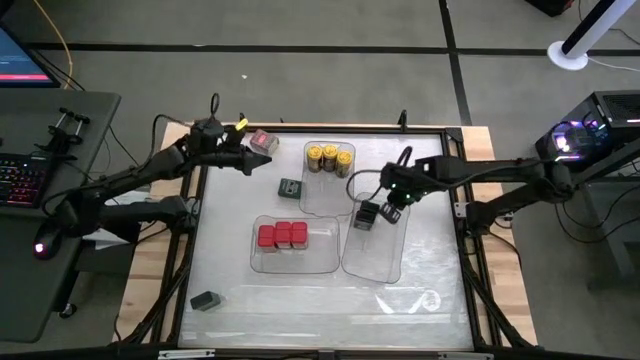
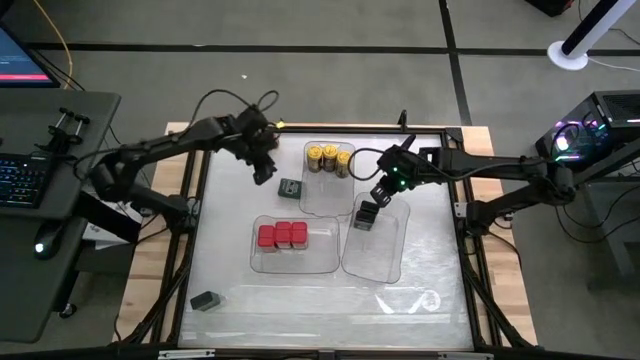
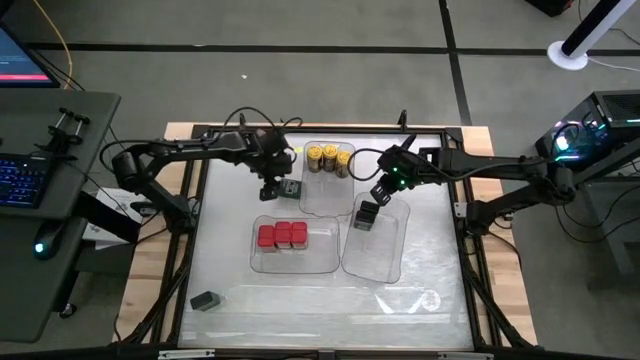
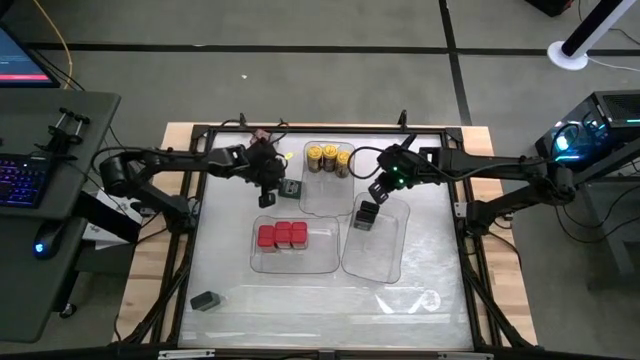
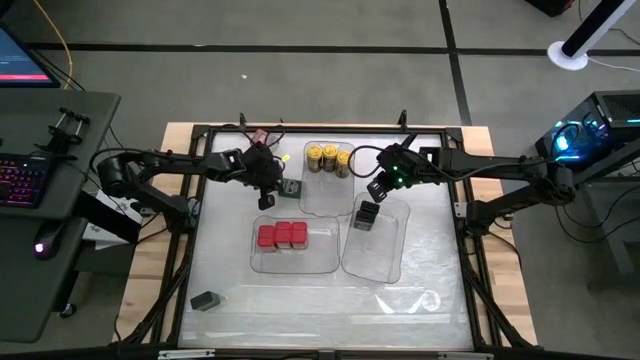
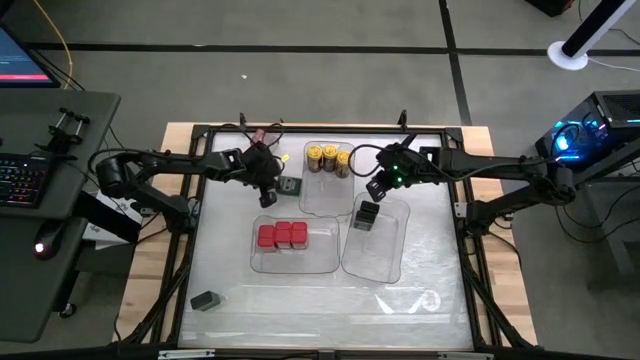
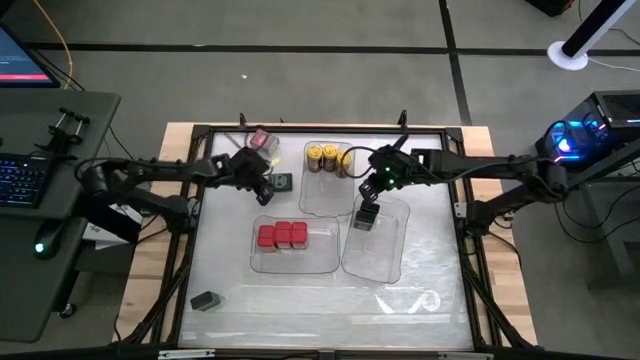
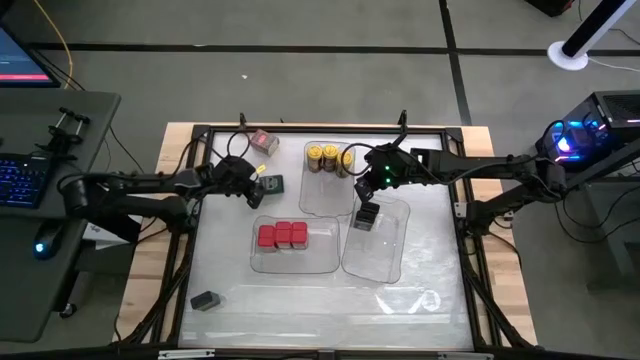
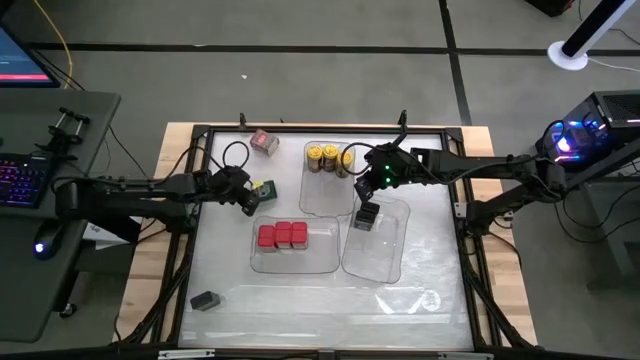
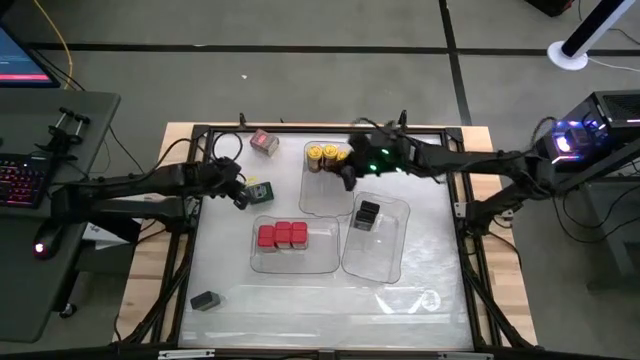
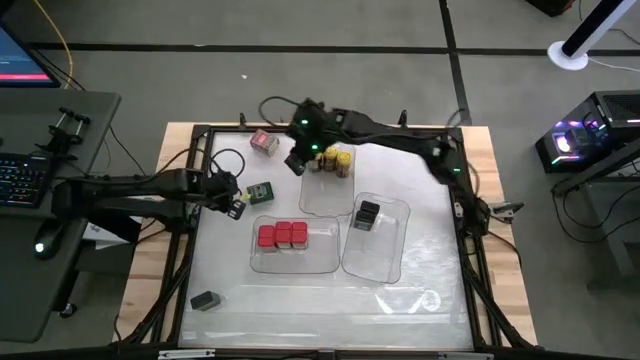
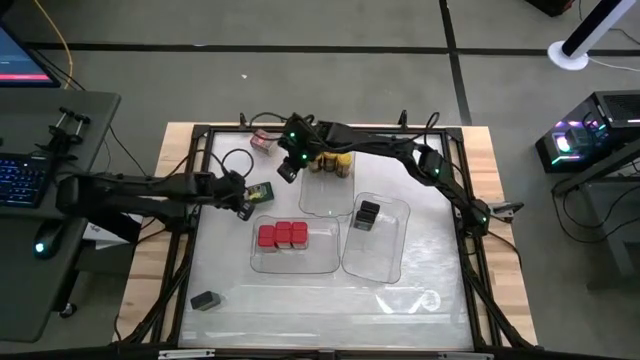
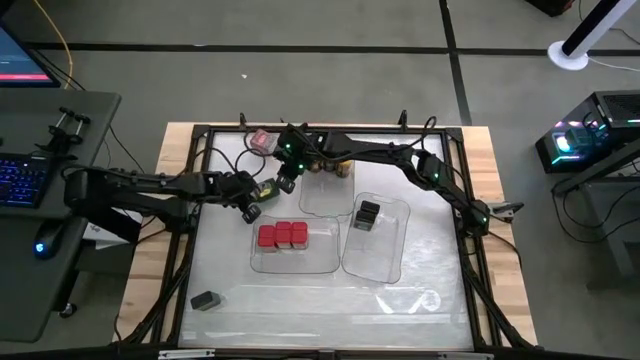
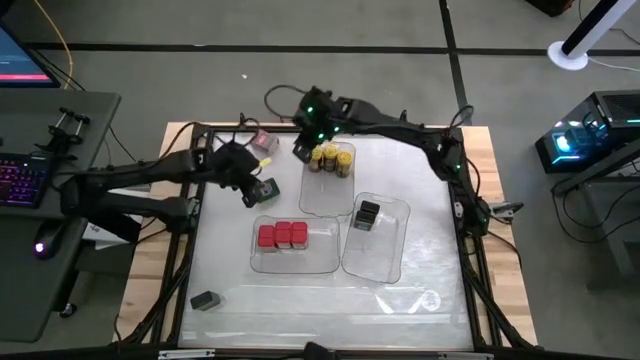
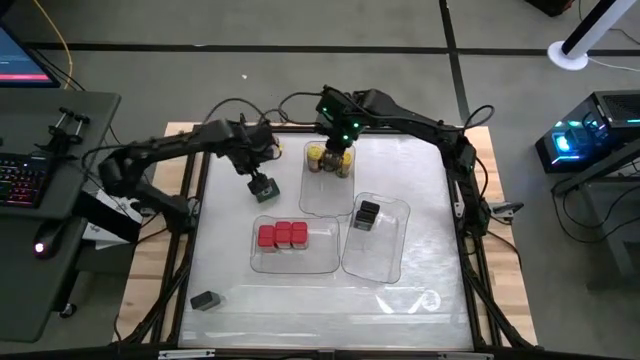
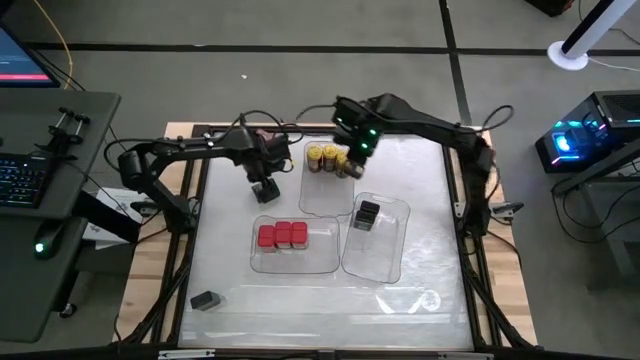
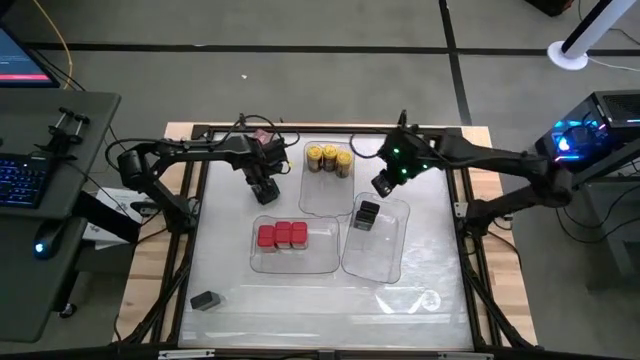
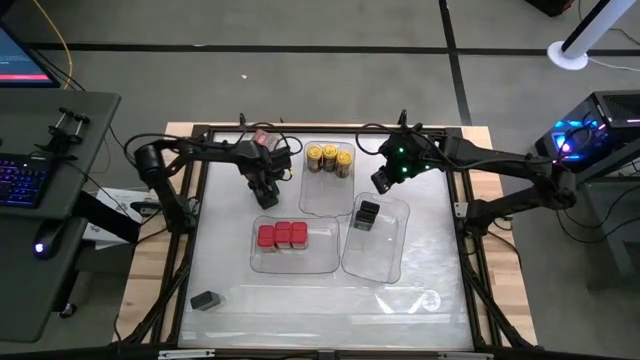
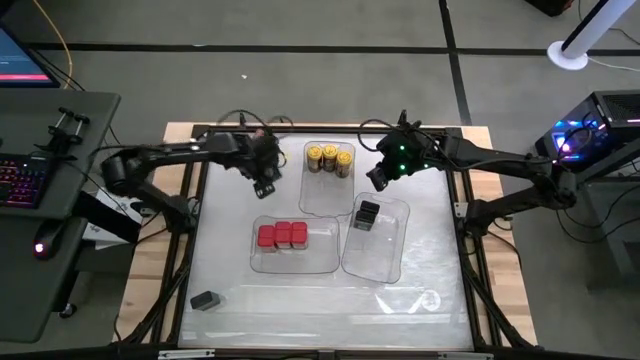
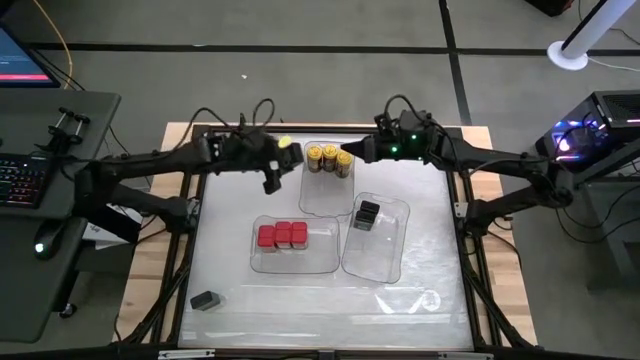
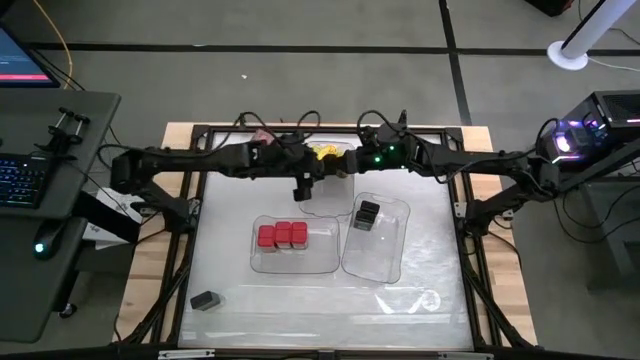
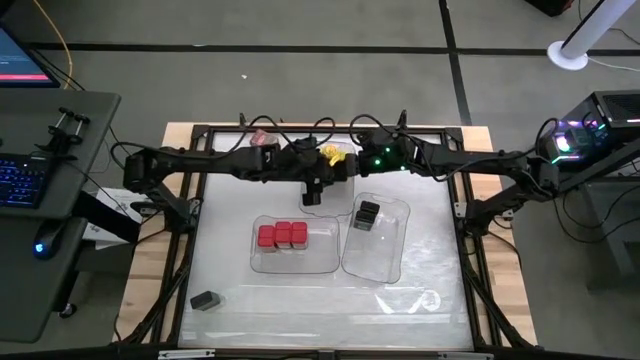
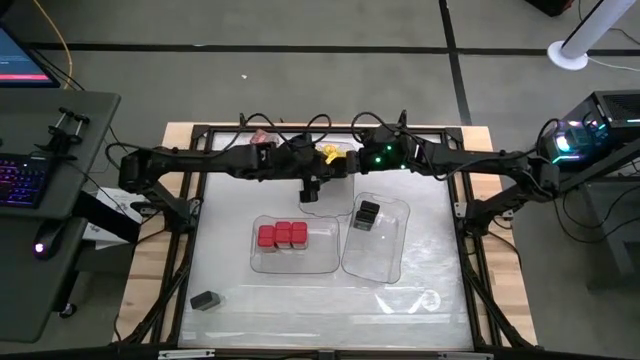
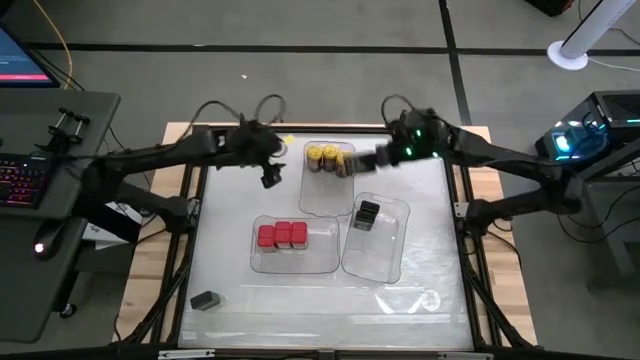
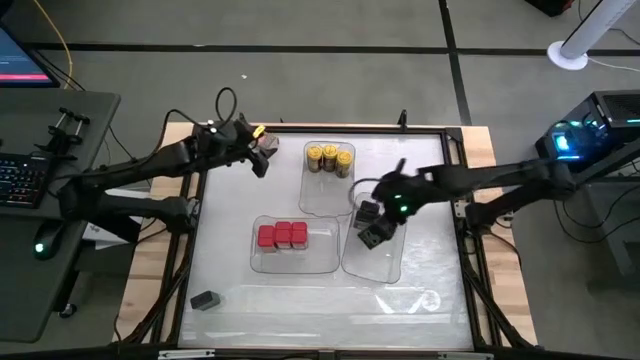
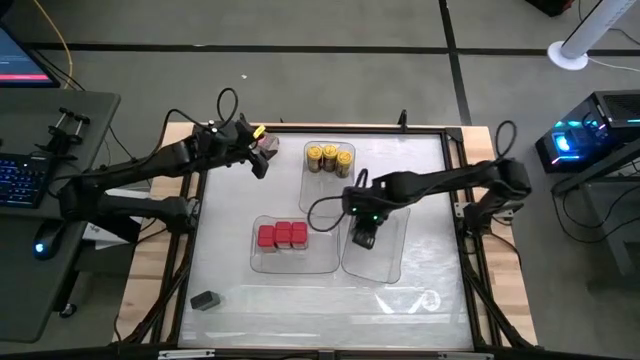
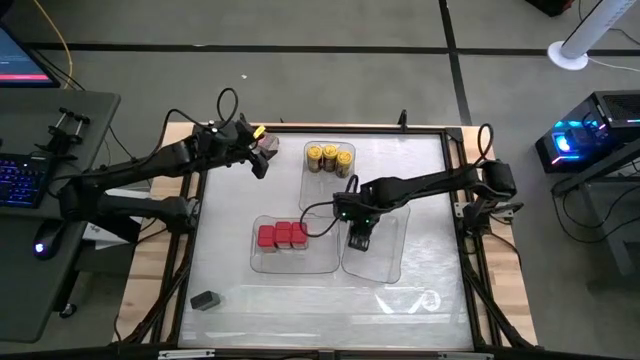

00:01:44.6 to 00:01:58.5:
Task: Sort spices by type
Put the top green seasoning can into the right transparent bin

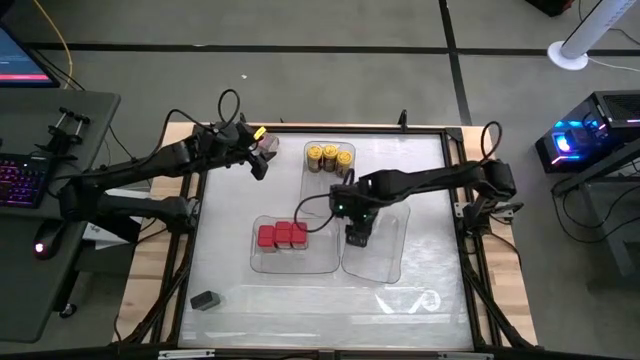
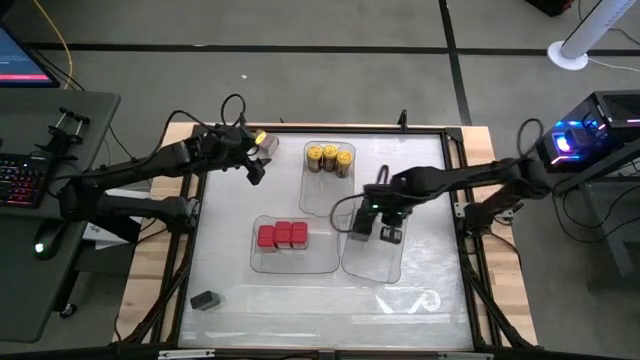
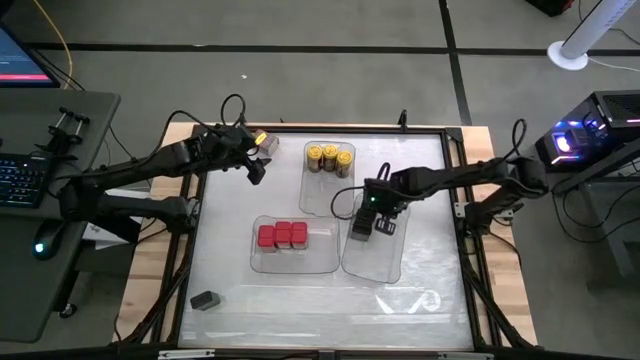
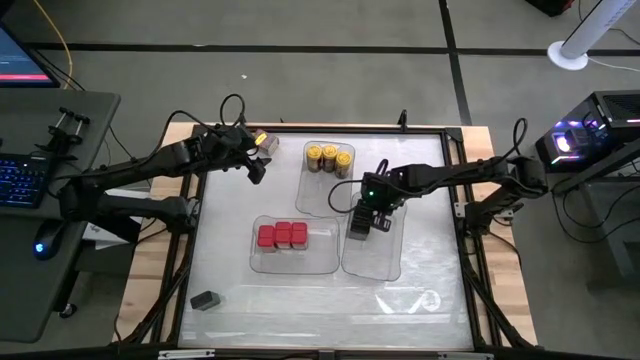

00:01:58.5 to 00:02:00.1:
Adjust the green seasoning can in the right transparent bin

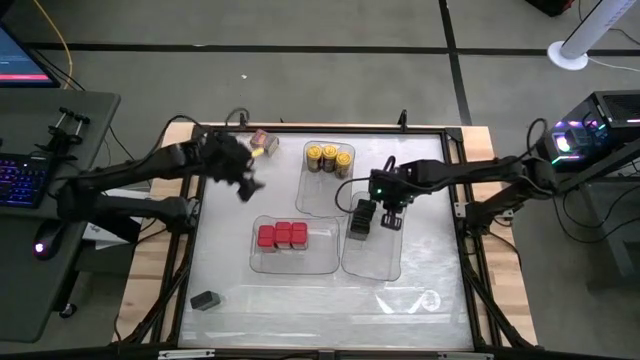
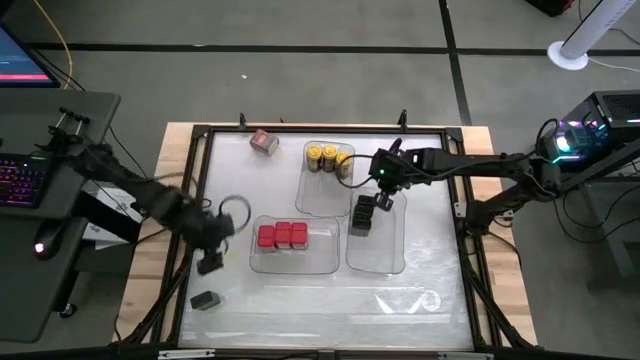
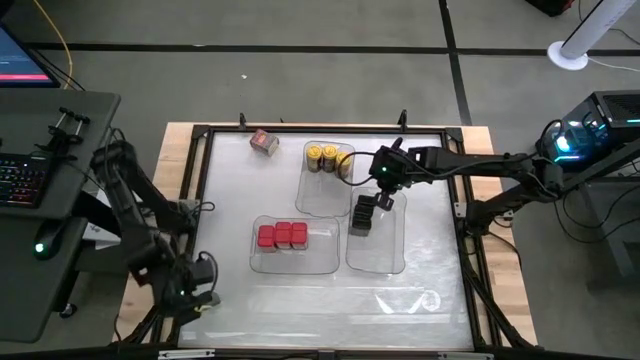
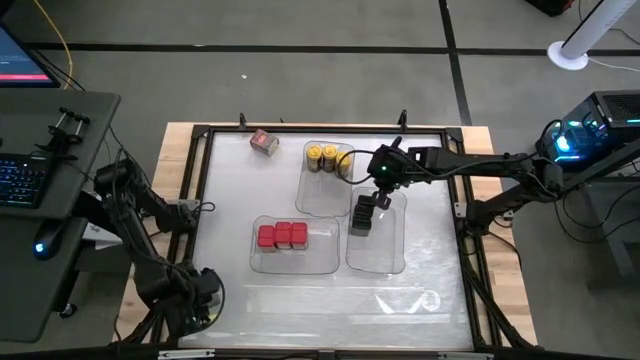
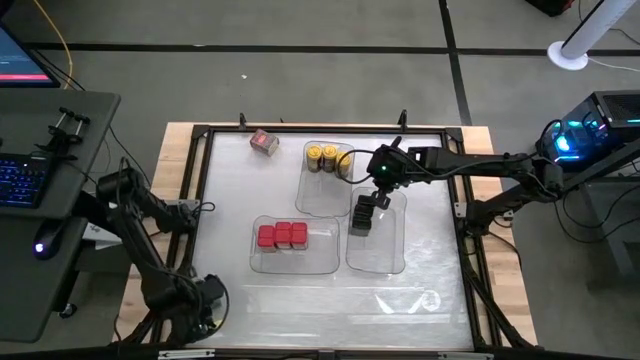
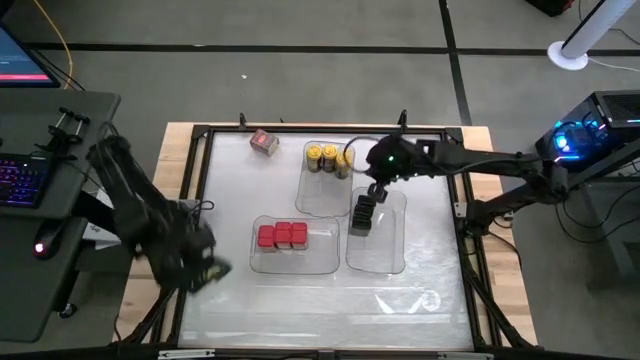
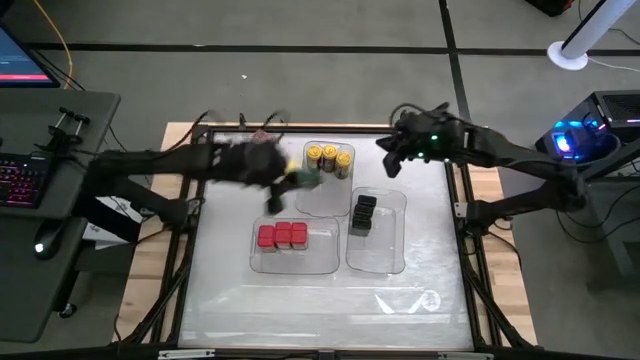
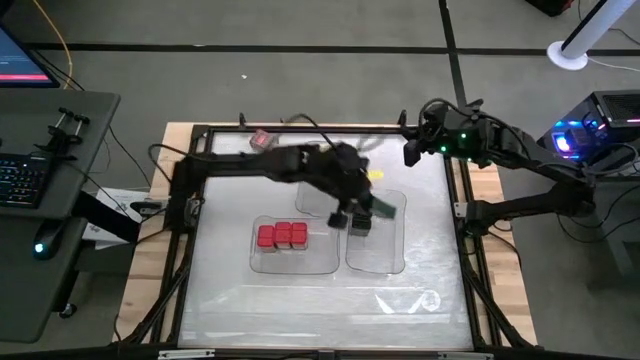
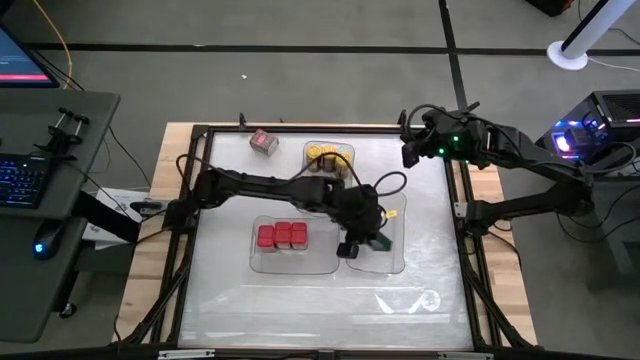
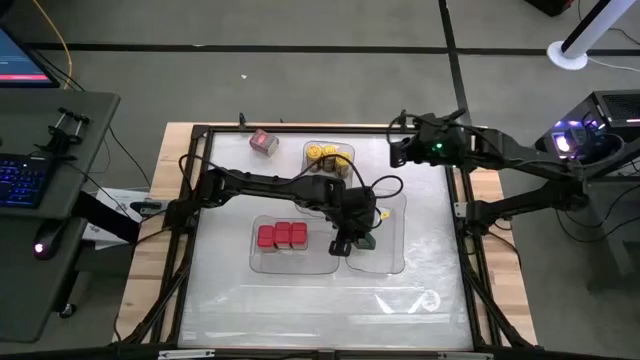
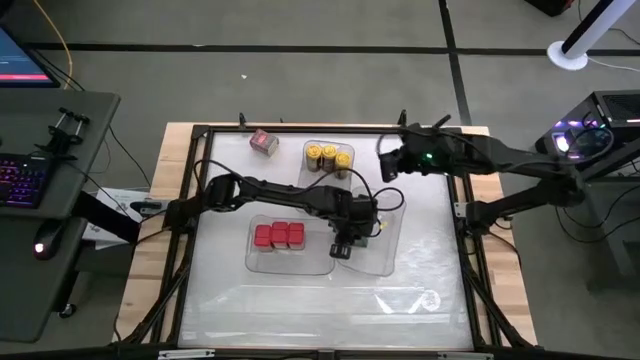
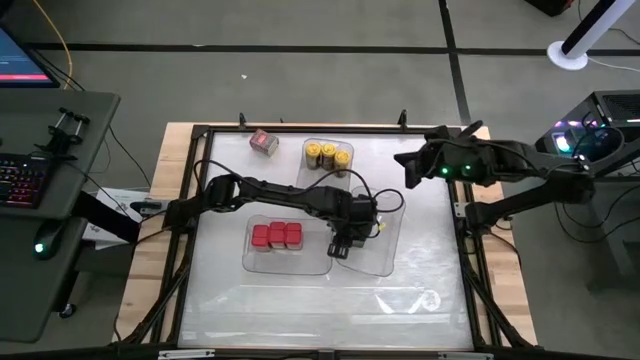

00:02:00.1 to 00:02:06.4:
Put the green seasoning can into the right transparent bin
